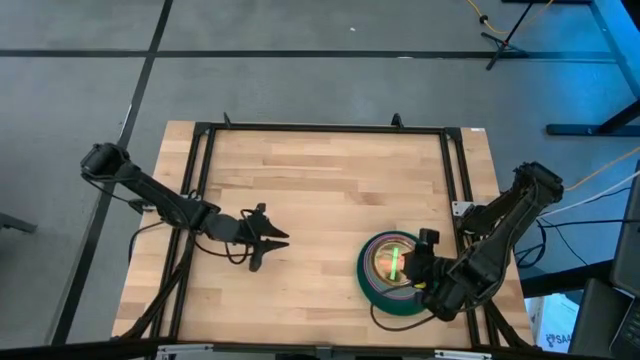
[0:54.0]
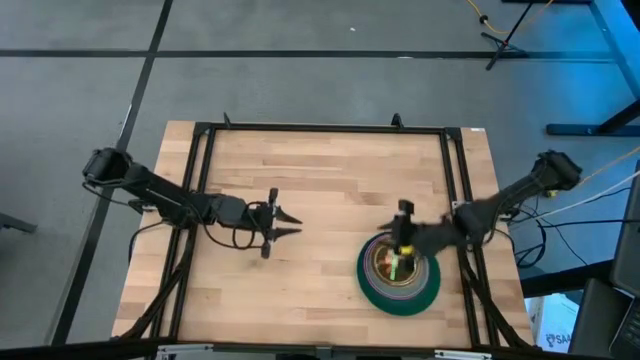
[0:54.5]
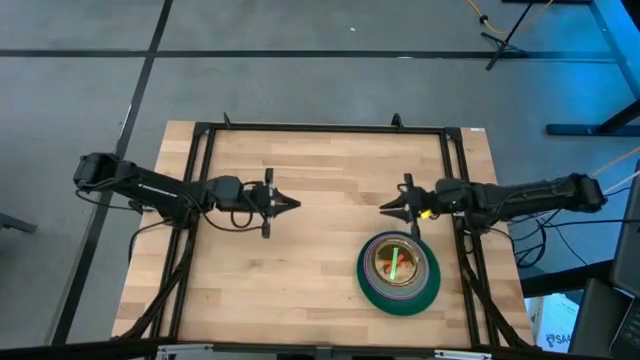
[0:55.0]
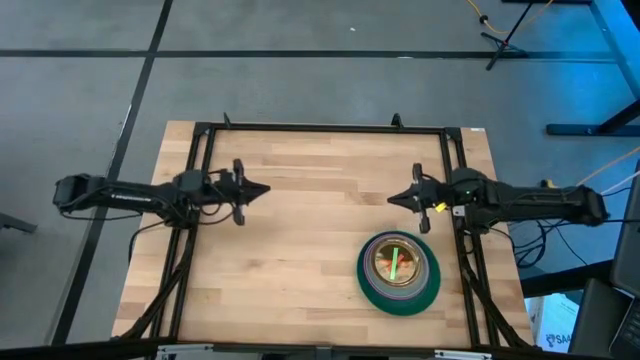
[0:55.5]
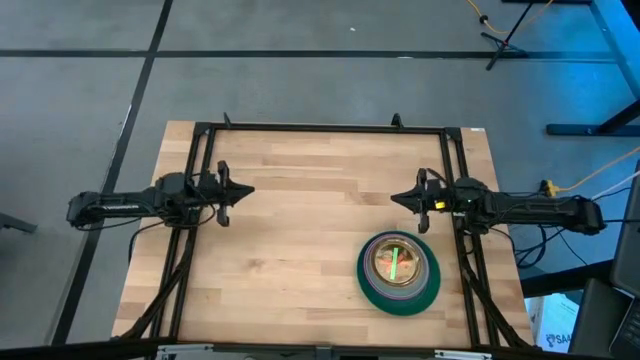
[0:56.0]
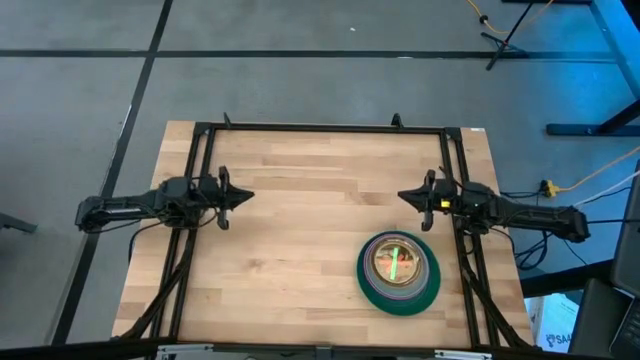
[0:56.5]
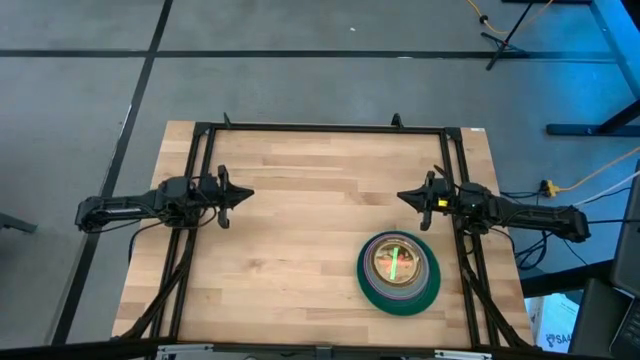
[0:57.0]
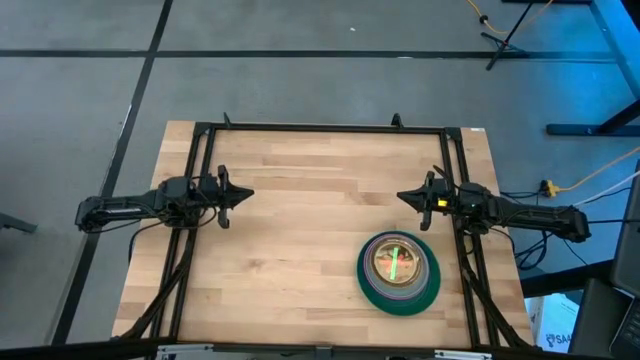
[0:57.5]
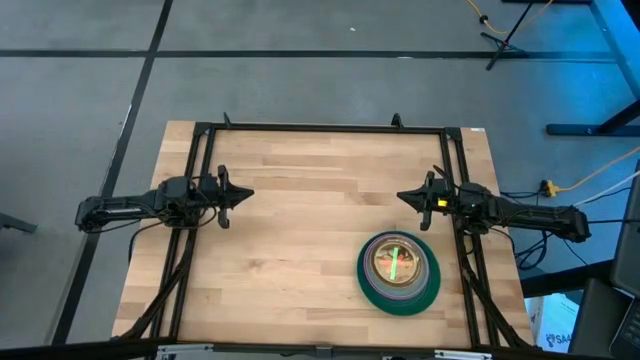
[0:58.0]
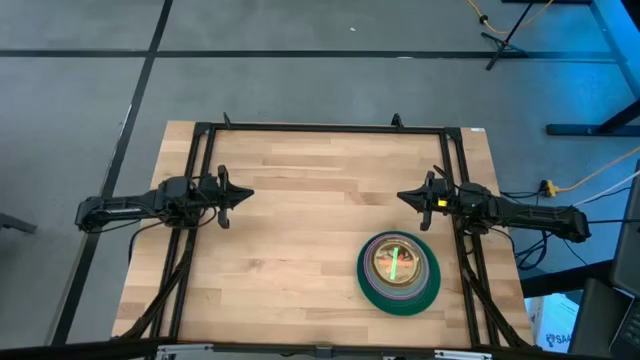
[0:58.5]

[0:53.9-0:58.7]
Task: Stack plastic plates
Return to Home Position

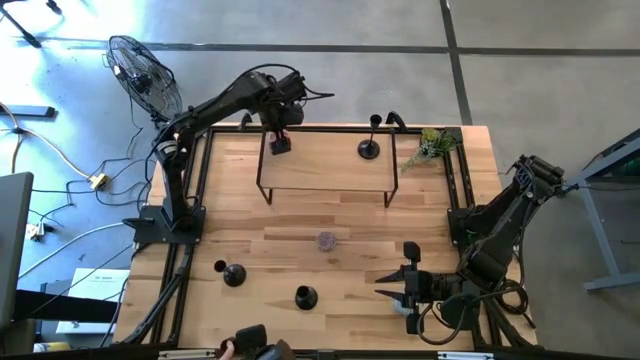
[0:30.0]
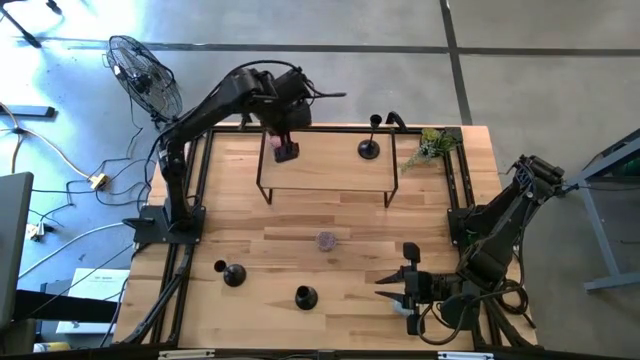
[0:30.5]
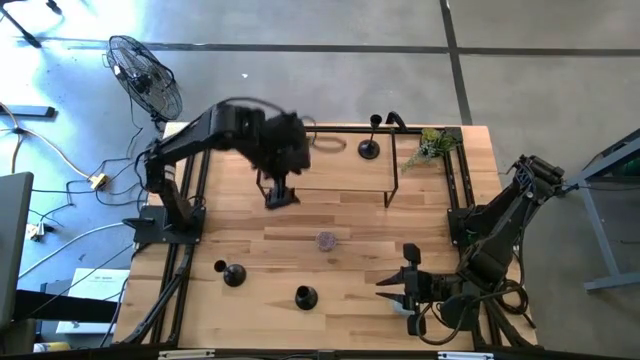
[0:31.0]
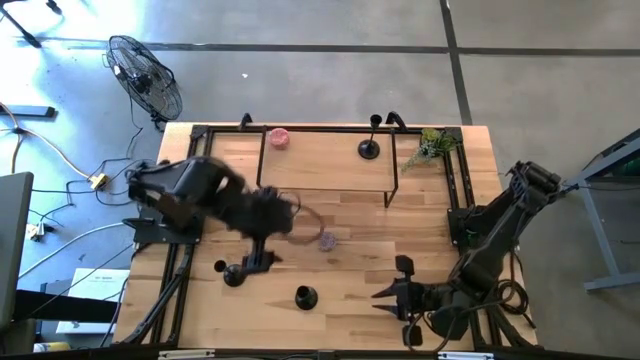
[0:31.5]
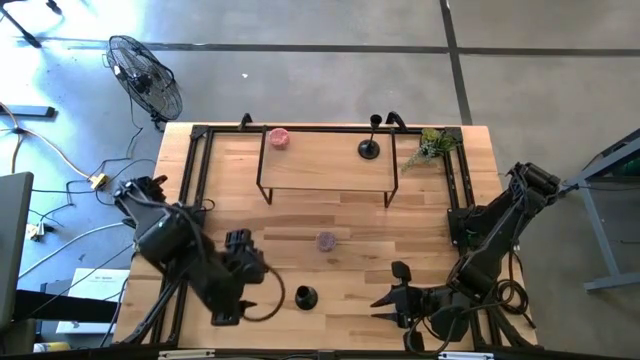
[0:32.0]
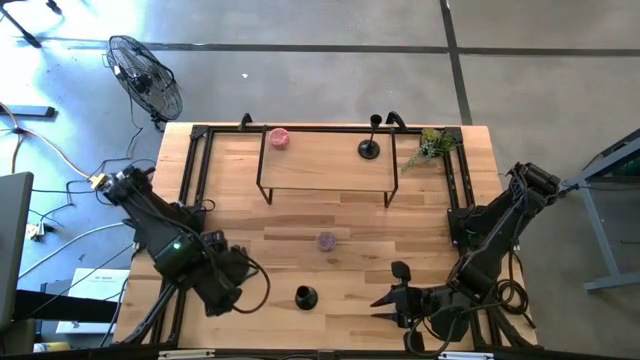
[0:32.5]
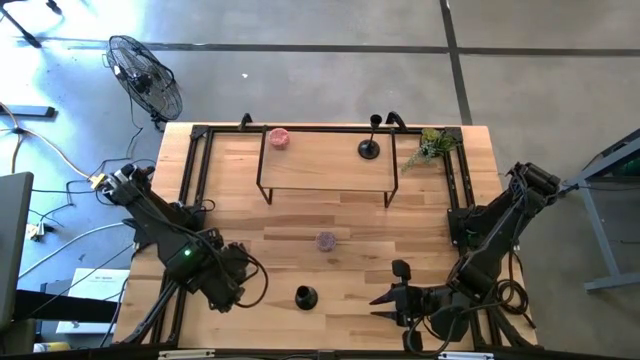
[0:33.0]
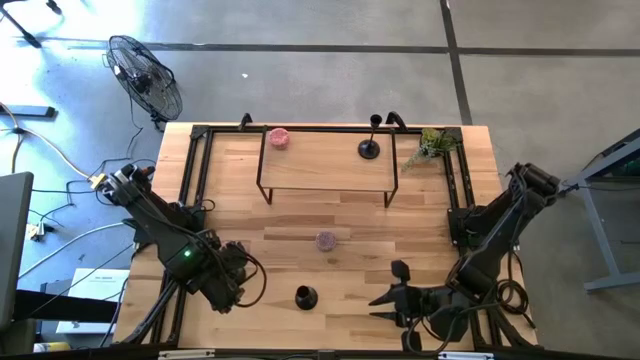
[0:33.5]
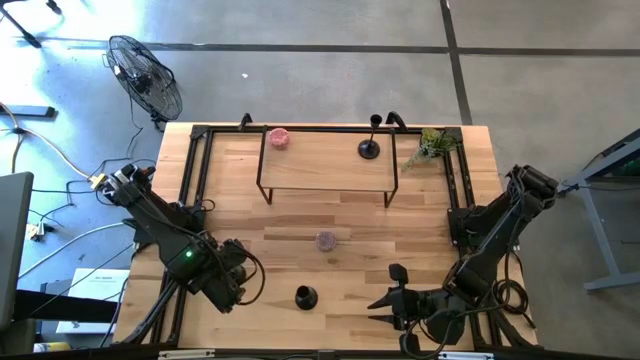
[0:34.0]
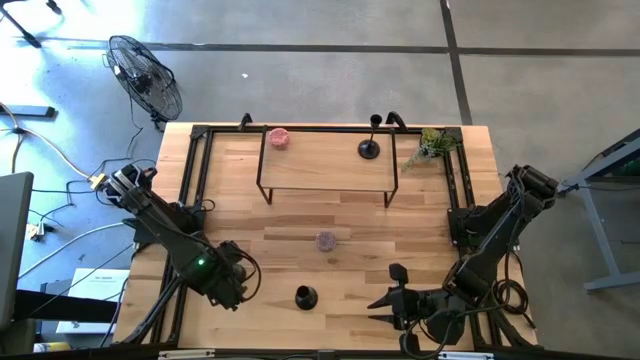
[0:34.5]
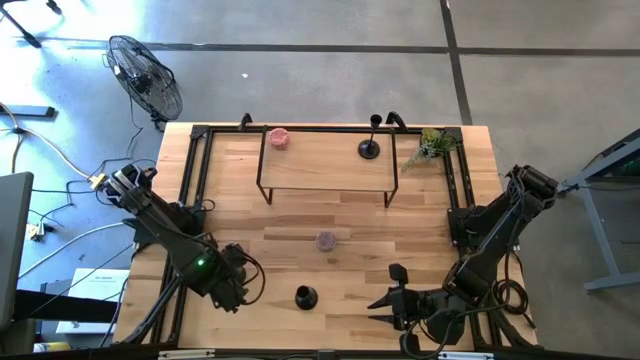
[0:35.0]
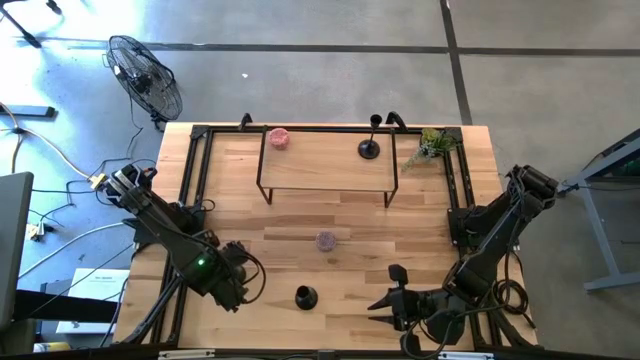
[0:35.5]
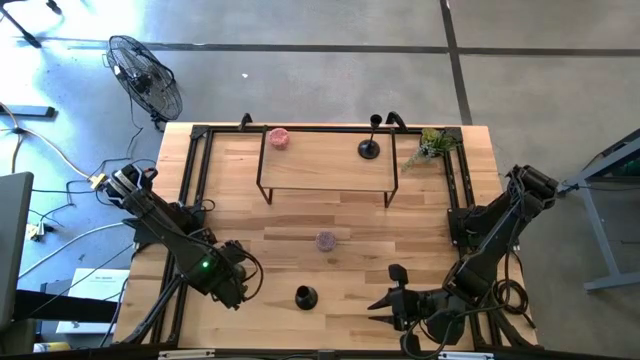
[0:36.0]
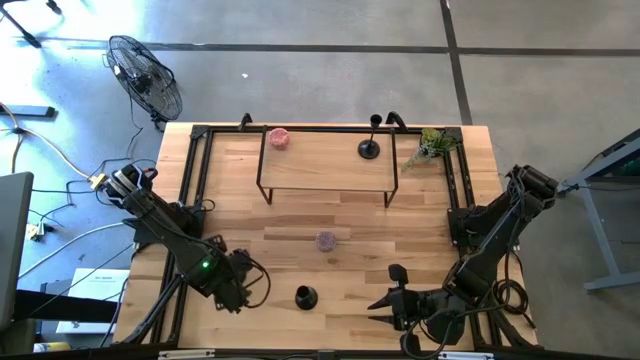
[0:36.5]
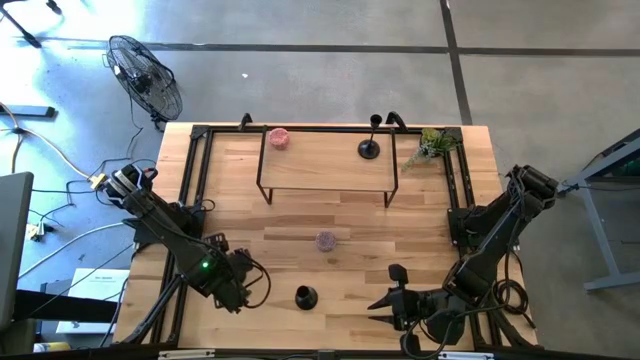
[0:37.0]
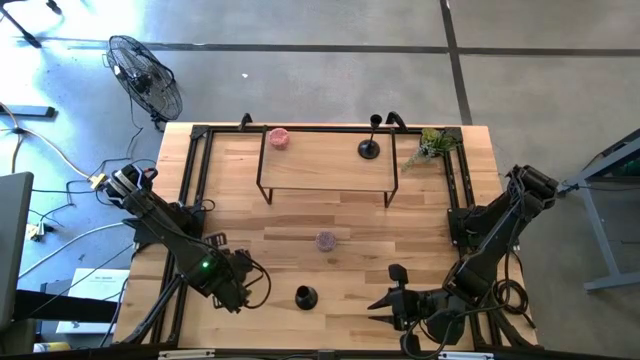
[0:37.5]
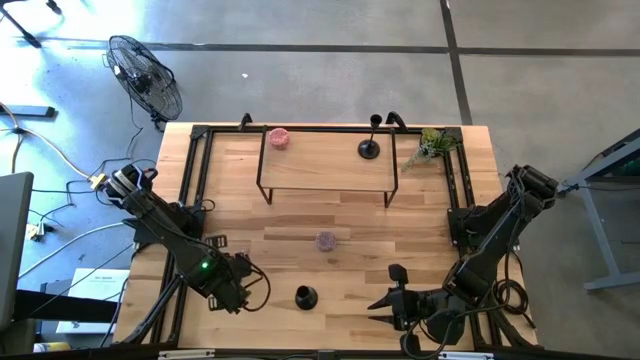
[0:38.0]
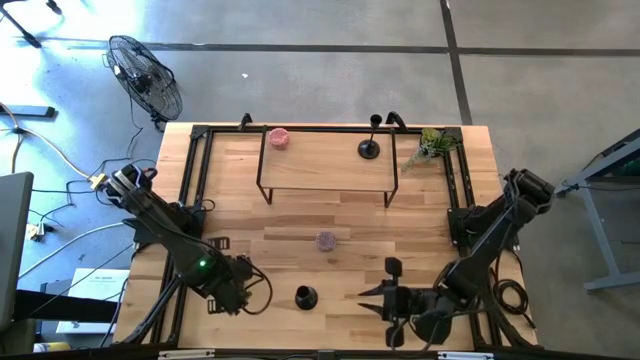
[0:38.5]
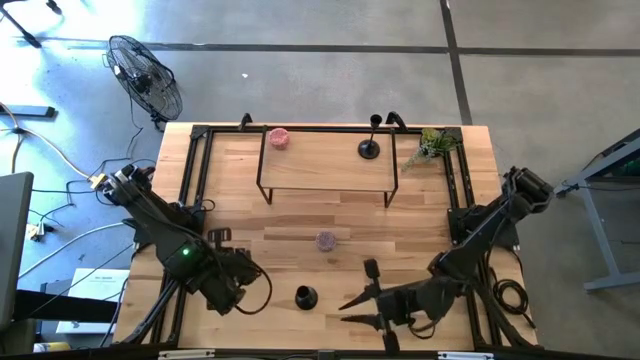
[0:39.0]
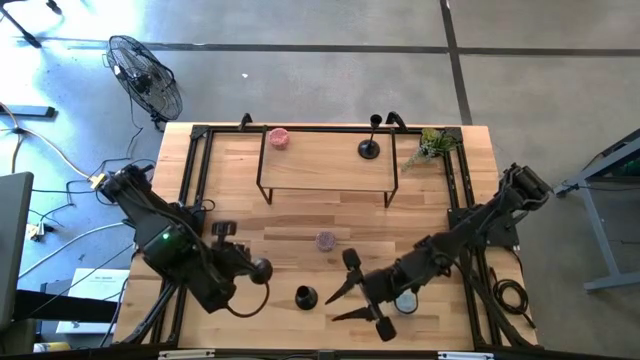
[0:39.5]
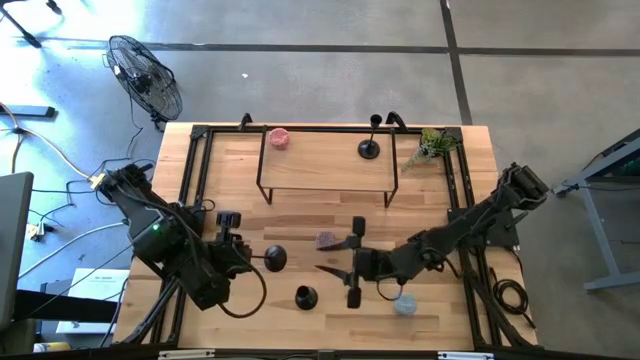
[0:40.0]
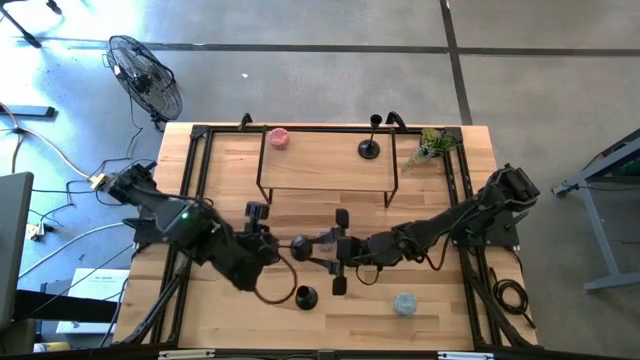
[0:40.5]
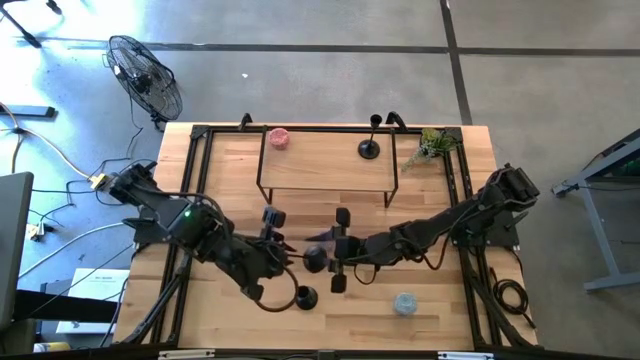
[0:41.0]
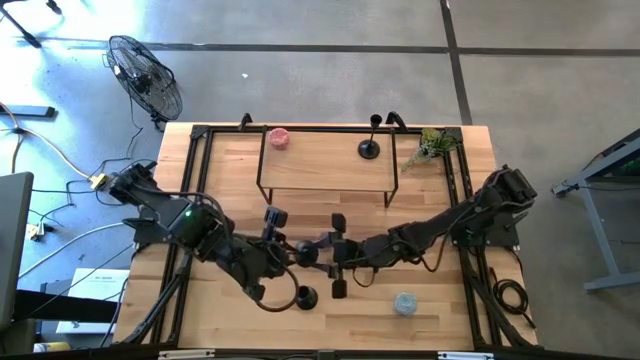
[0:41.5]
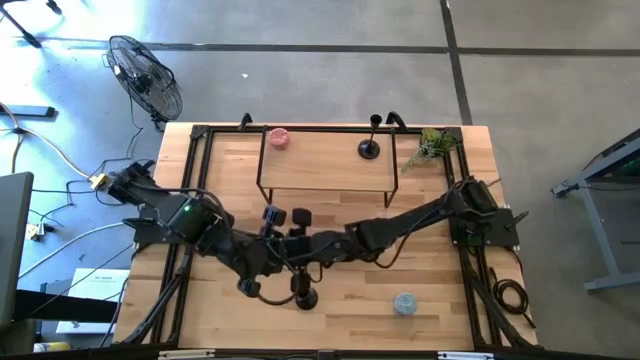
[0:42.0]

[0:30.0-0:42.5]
Task: Pick & Place candle stick holders
Put the left black candle holder on the shelf
